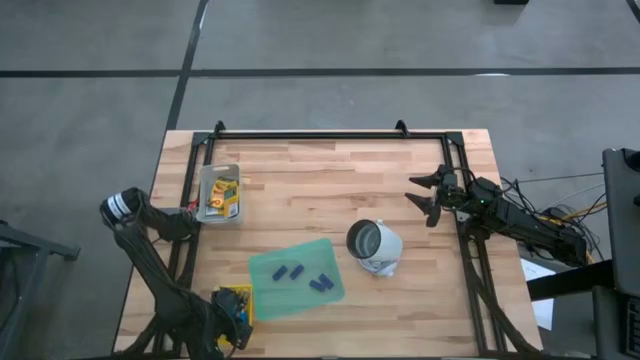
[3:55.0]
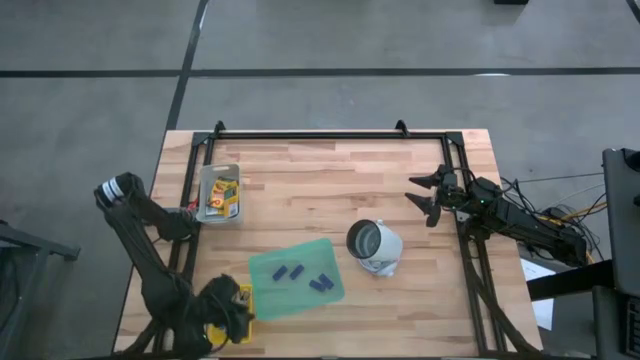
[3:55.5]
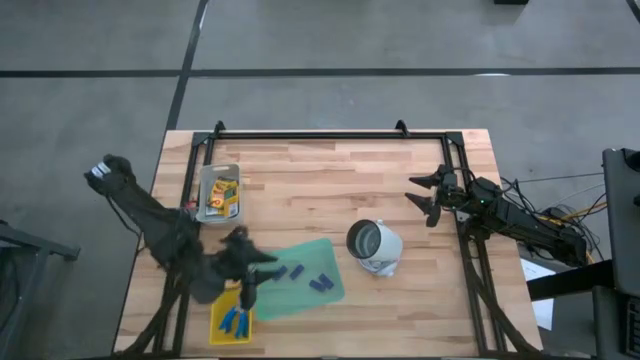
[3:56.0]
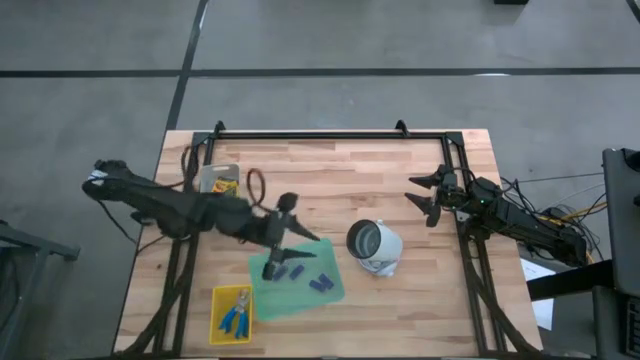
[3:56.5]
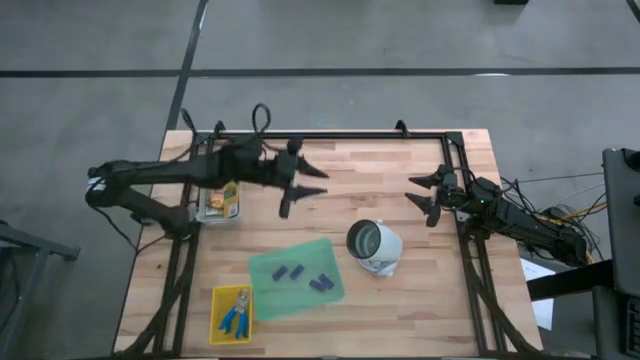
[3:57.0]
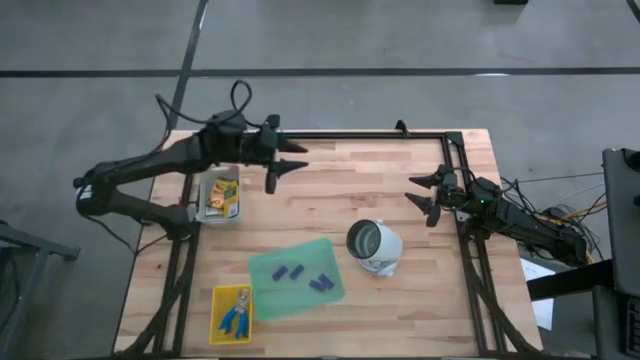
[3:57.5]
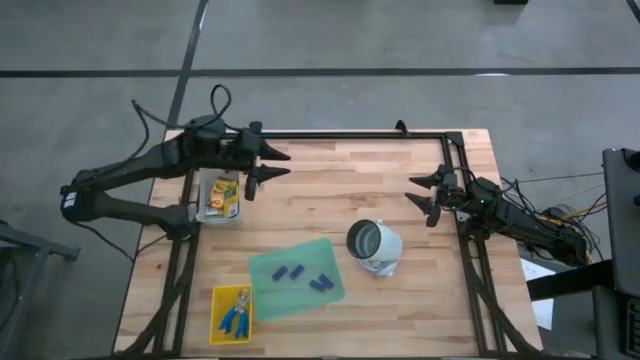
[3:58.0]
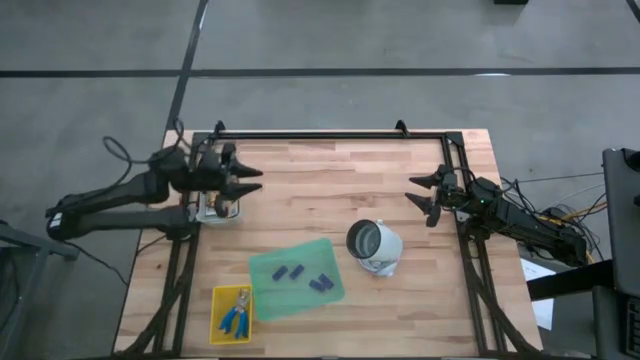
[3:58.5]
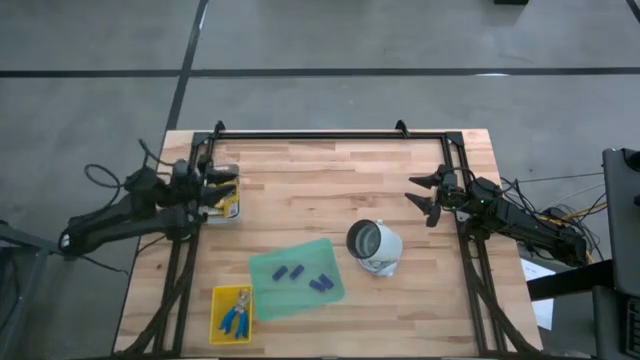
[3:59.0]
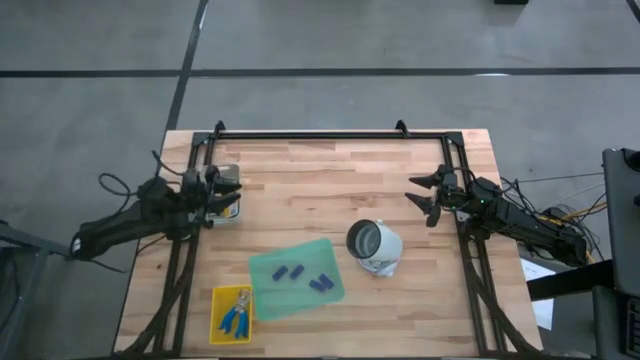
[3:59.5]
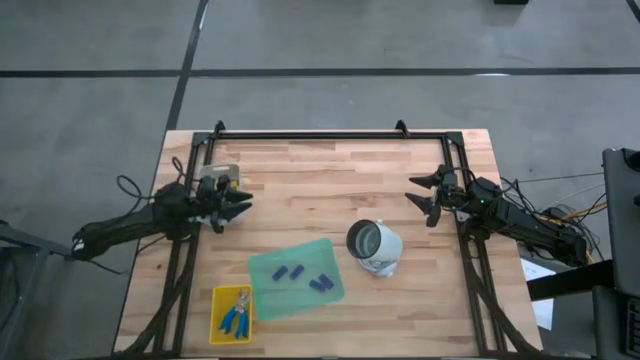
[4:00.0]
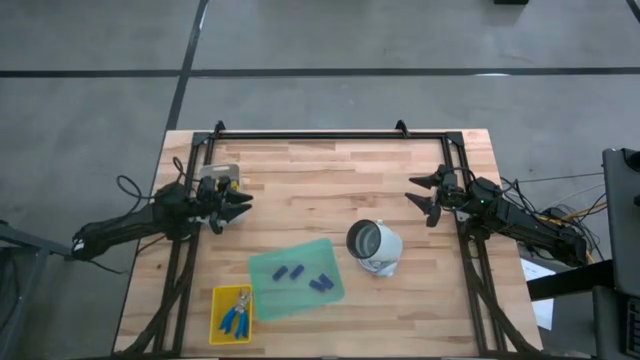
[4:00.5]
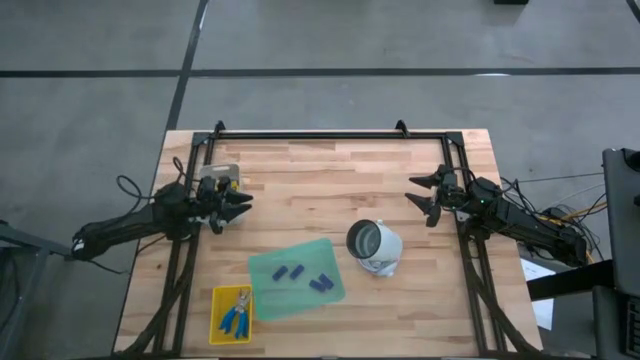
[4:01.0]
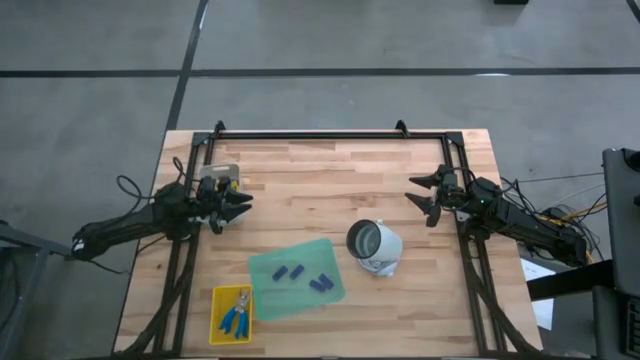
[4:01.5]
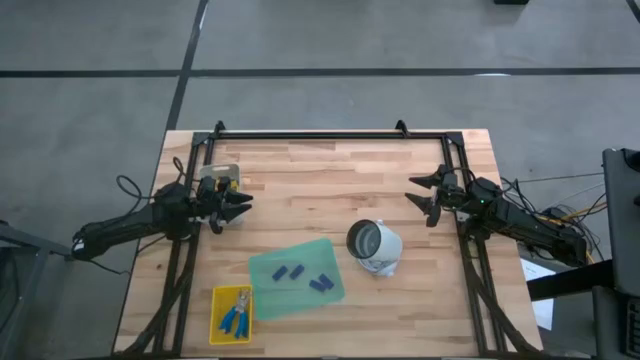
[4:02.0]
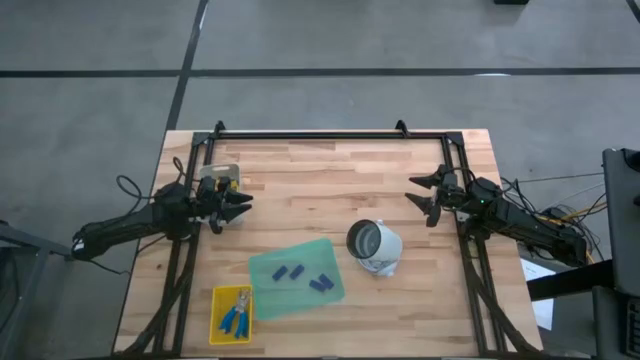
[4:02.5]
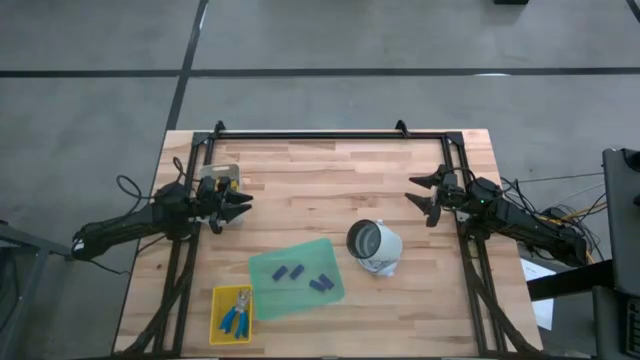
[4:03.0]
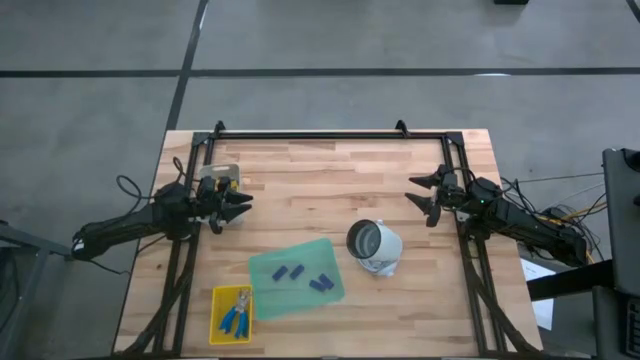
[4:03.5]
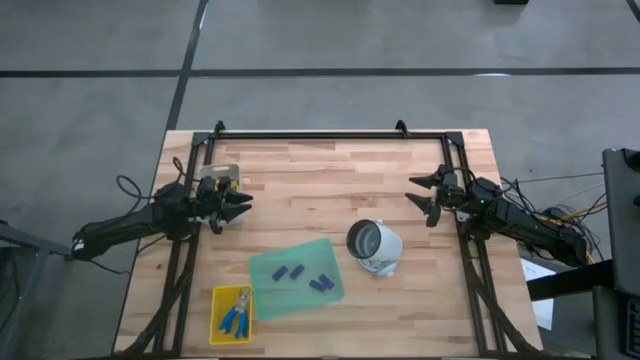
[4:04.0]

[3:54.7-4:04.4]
Task: Pick & Place School Supplies
Return to Home Position

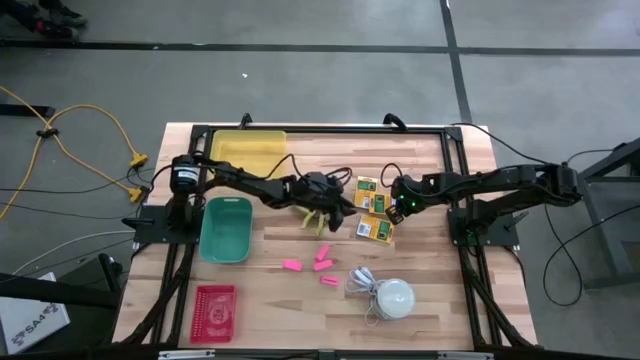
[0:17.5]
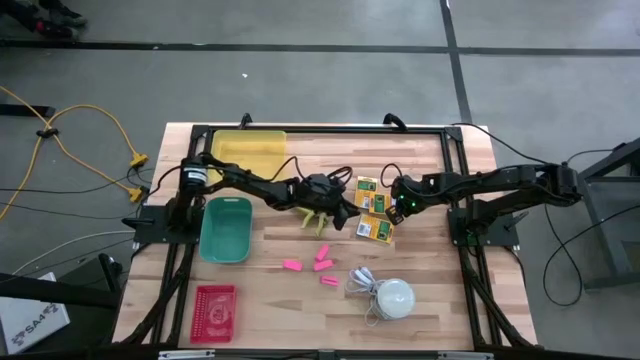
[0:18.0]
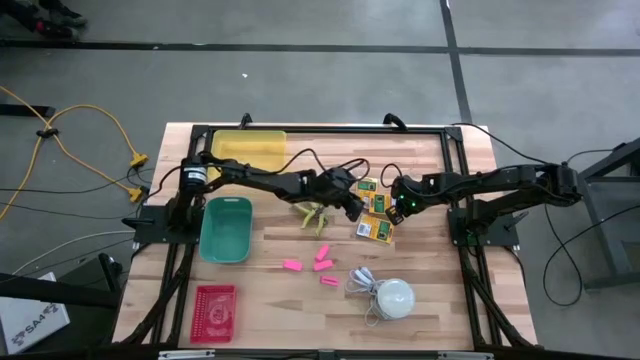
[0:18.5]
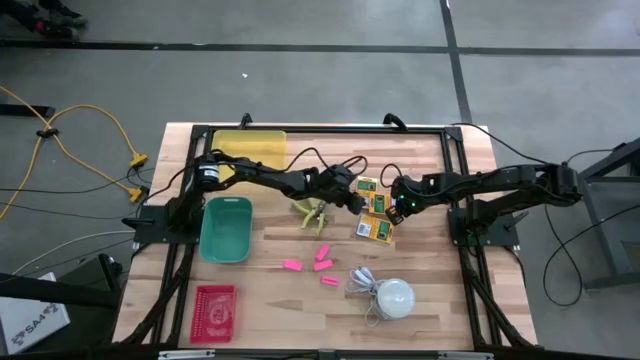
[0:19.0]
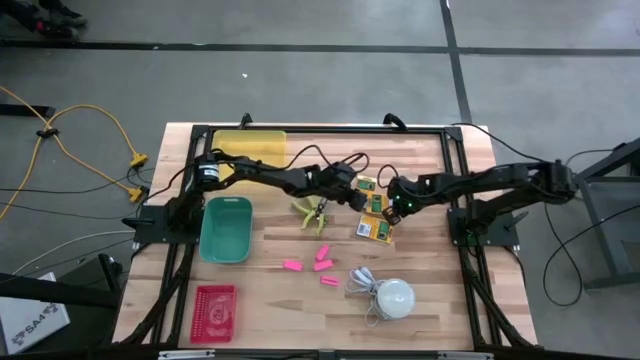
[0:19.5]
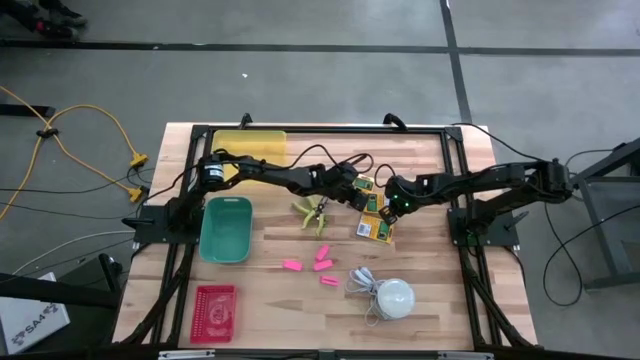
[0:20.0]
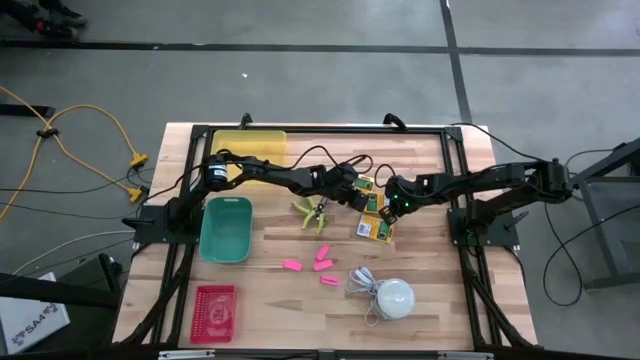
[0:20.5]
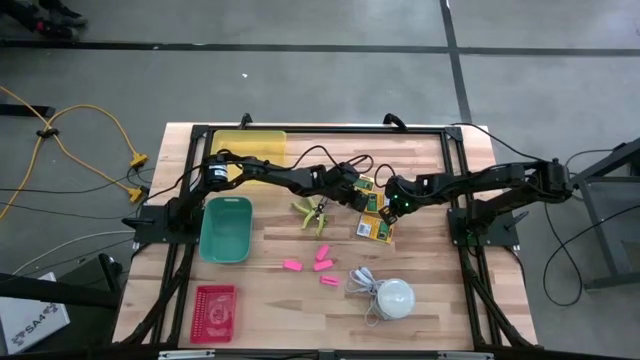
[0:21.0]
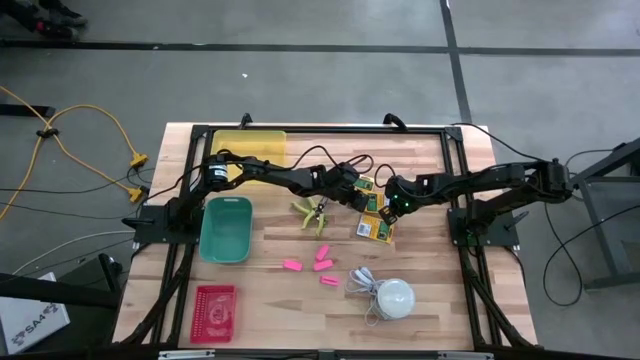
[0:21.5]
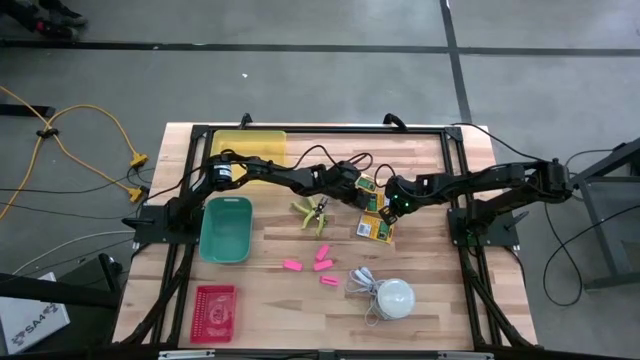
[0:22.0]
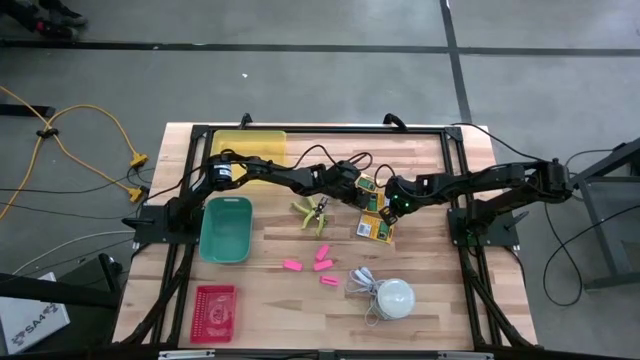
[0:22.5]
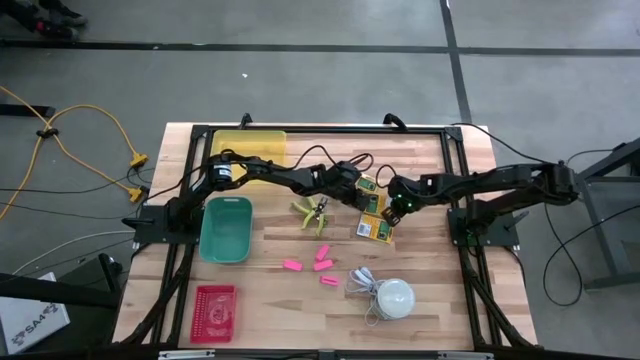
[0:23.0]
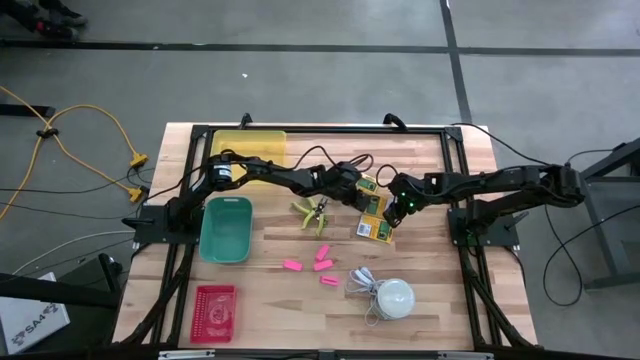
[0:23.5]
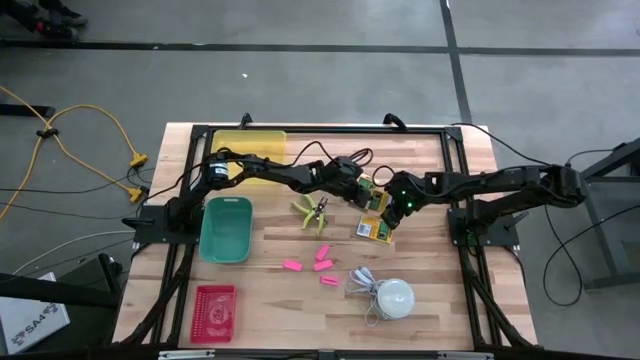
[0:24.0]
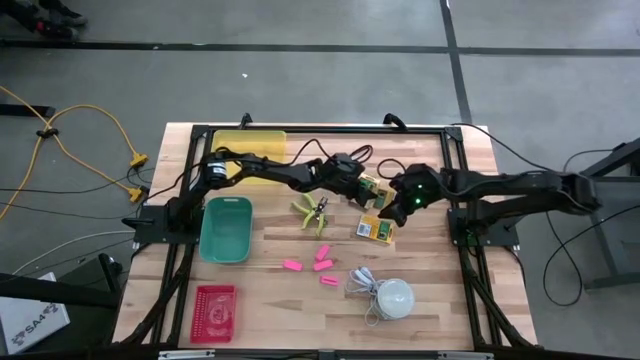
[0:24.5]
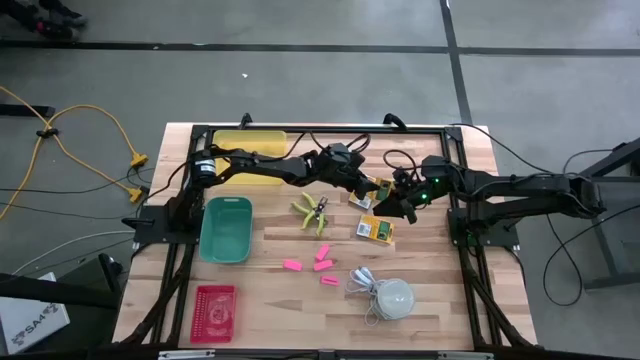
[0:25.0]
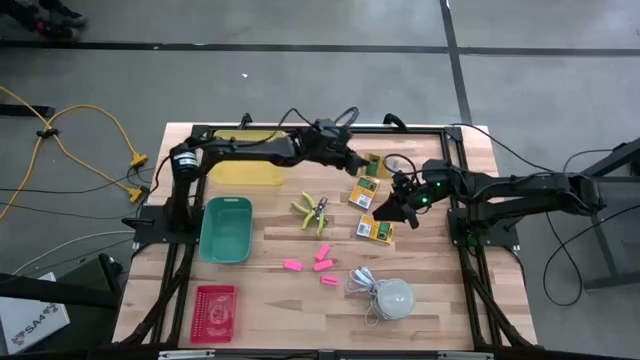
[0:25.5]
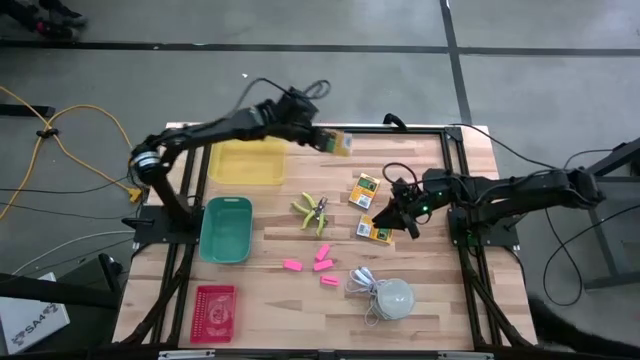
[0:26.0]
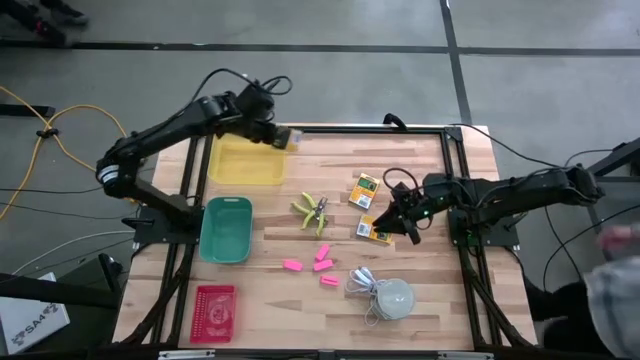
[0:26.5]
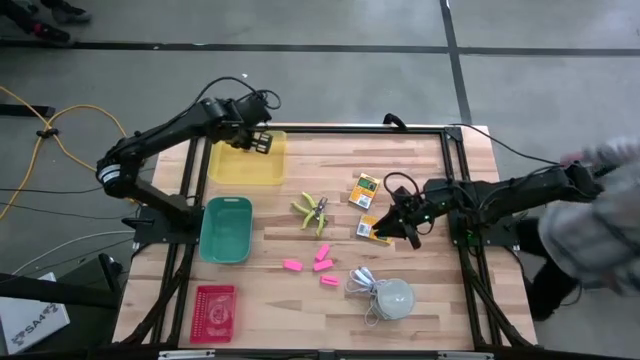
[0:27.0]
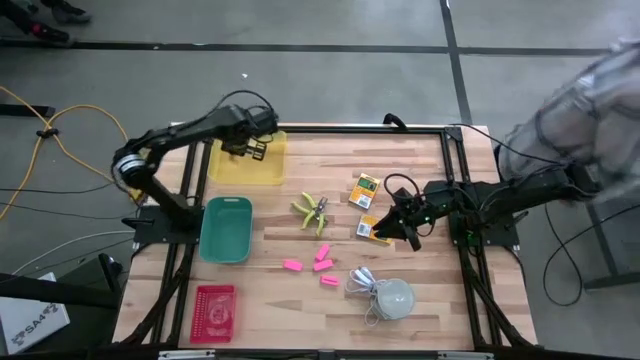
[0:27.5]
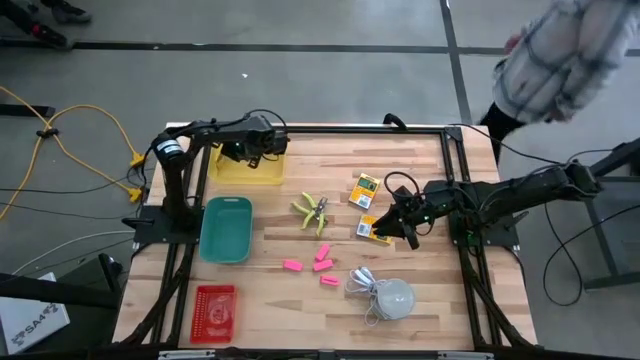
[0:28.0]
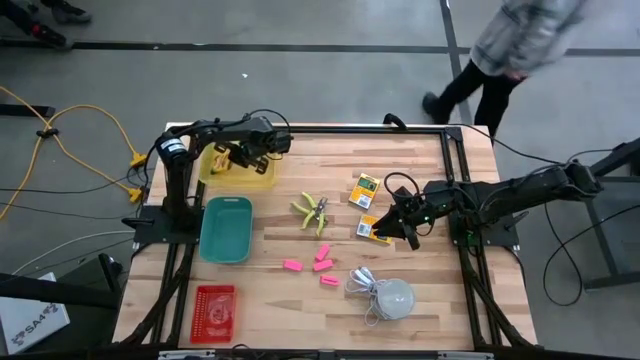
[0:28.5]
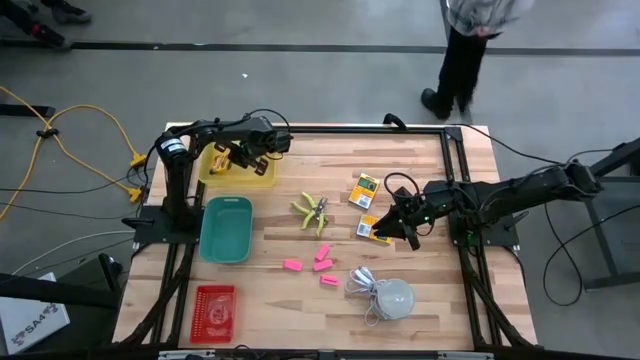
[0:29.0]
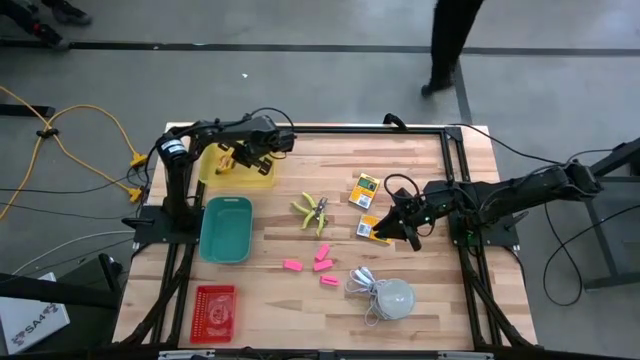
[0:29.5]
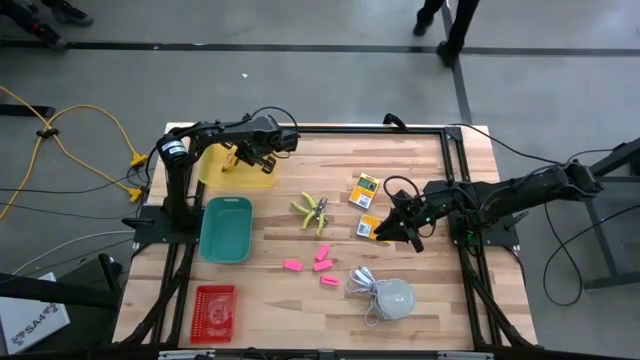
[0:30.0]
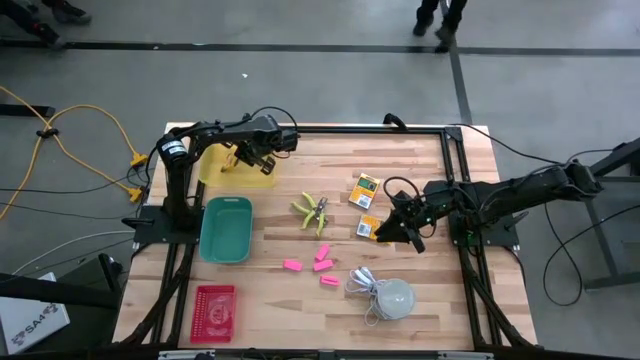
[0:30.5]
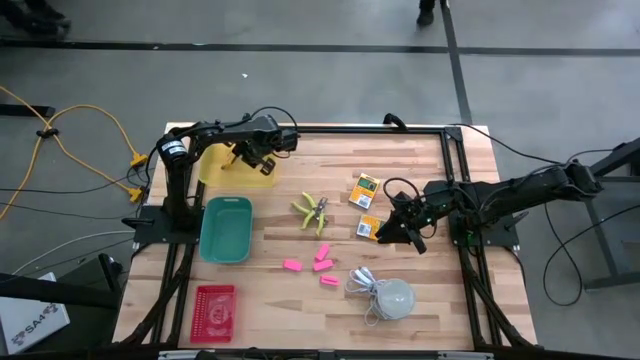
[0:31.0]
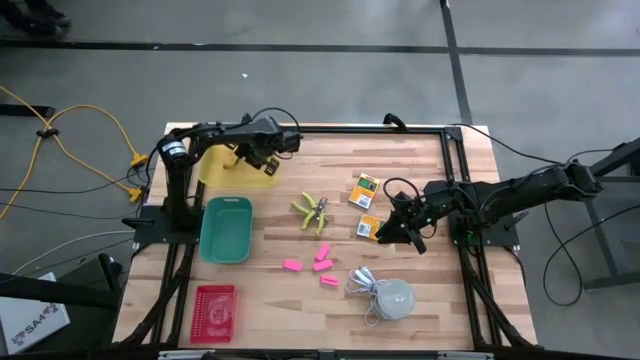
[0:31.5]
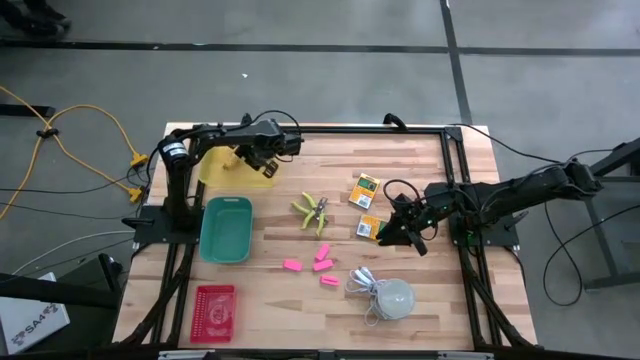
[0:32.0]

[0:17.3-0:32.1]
Task: Pick & Place School Supplies
Put the middle yellow crayon box into the yellow bin
